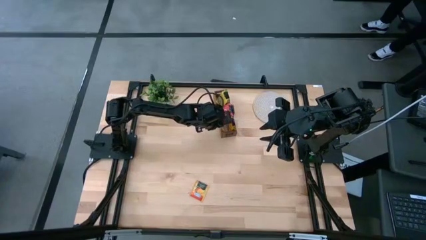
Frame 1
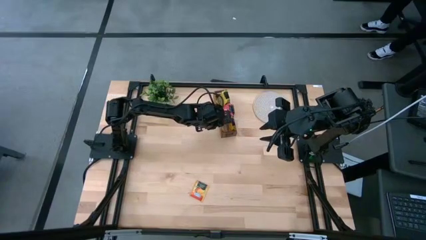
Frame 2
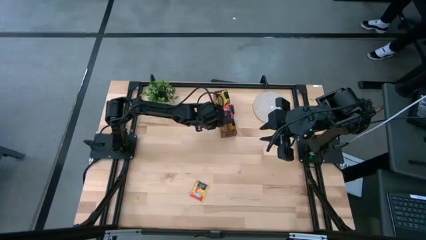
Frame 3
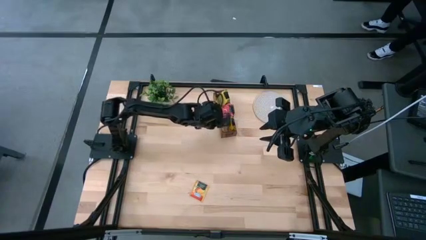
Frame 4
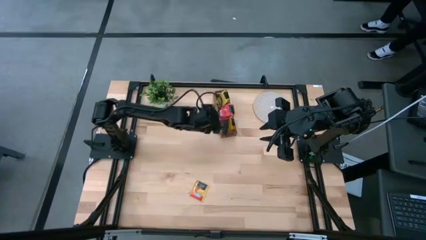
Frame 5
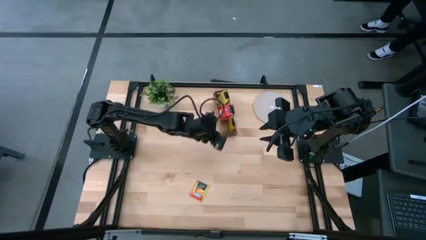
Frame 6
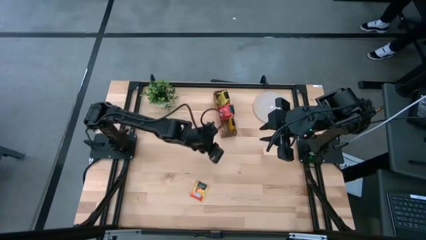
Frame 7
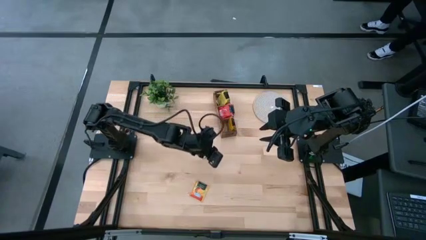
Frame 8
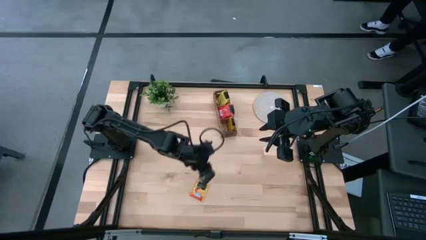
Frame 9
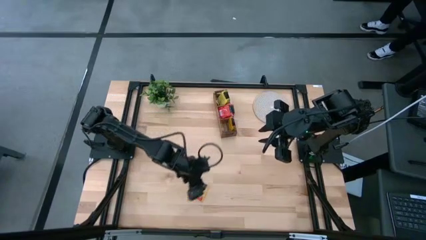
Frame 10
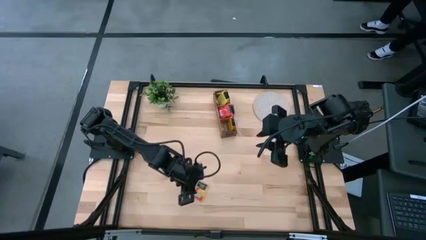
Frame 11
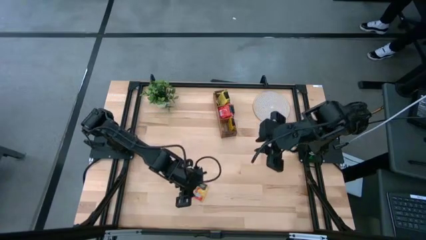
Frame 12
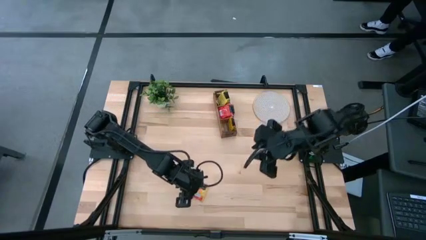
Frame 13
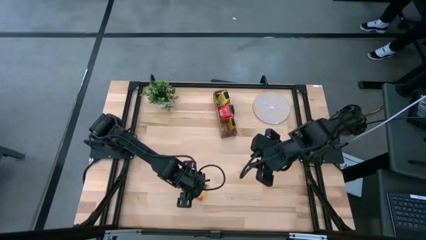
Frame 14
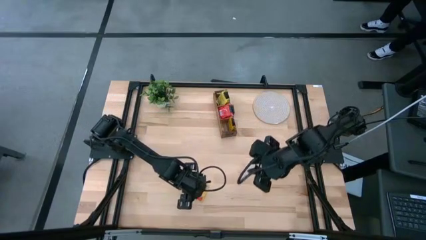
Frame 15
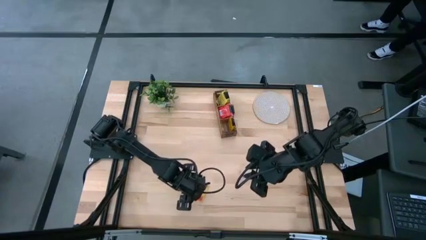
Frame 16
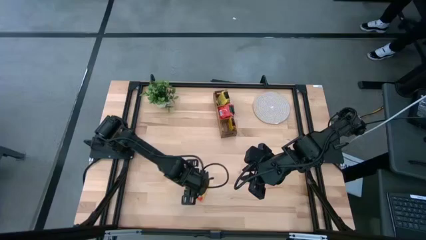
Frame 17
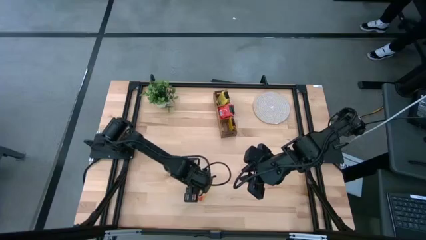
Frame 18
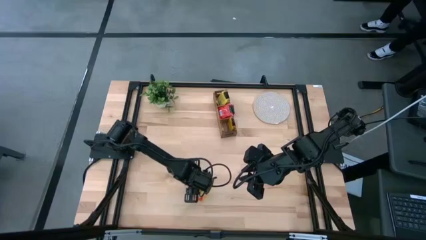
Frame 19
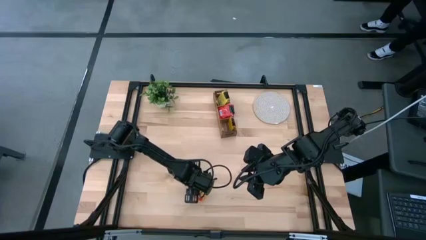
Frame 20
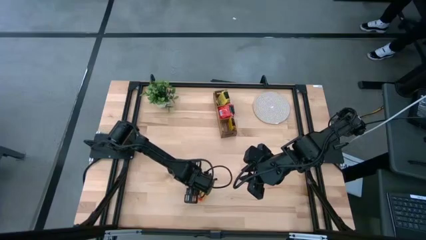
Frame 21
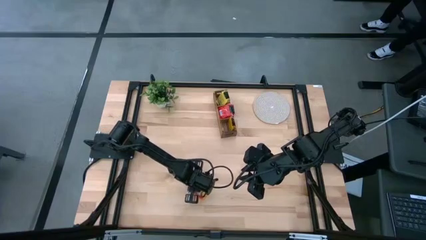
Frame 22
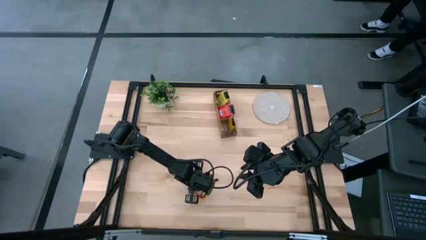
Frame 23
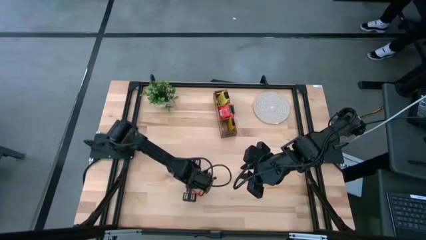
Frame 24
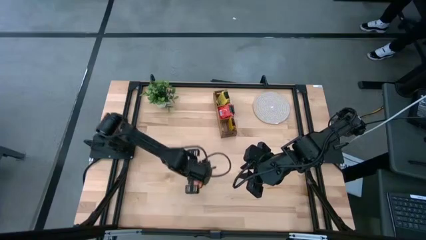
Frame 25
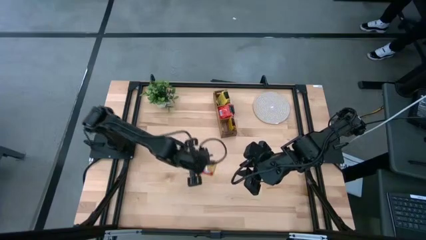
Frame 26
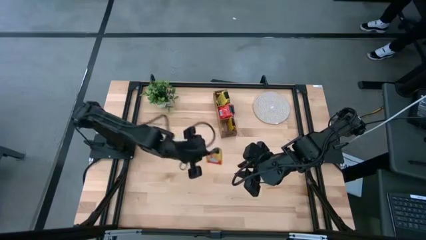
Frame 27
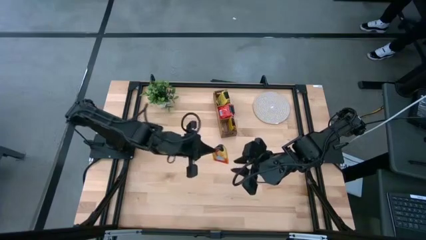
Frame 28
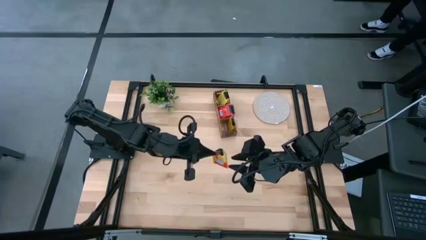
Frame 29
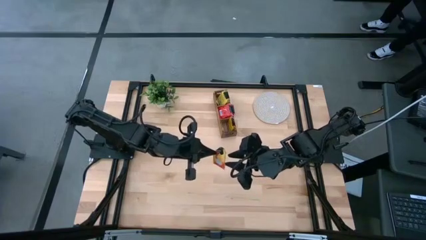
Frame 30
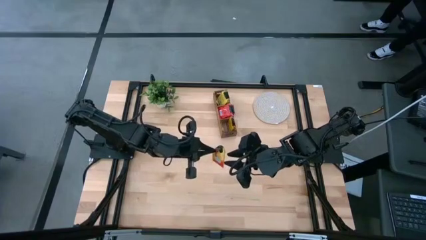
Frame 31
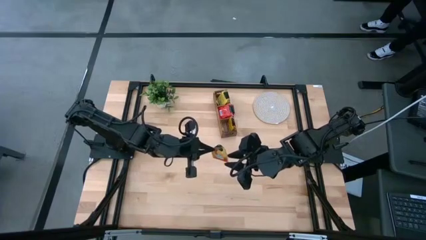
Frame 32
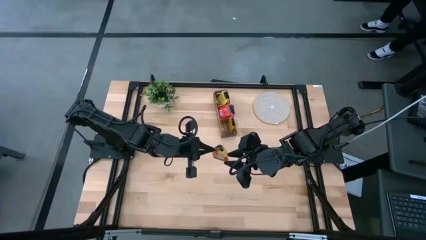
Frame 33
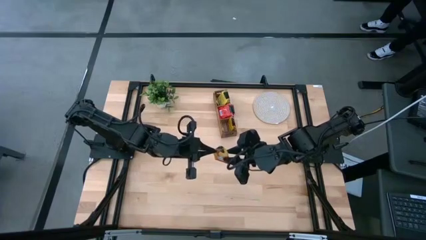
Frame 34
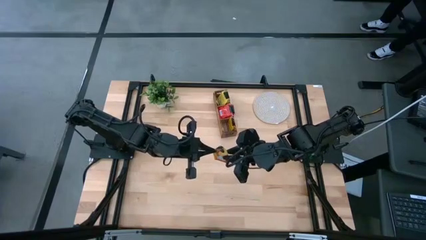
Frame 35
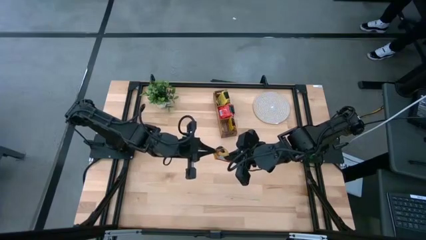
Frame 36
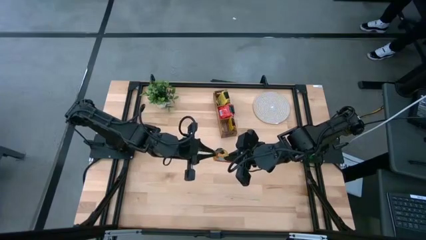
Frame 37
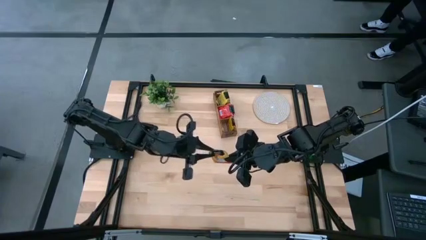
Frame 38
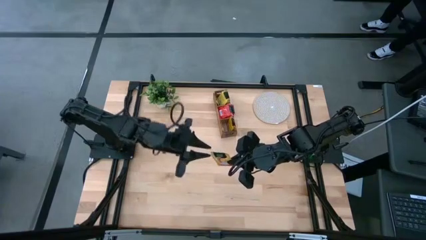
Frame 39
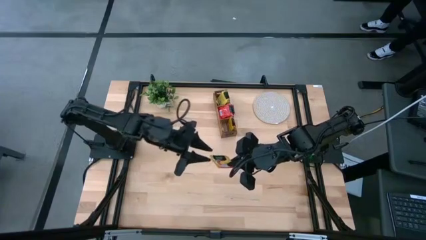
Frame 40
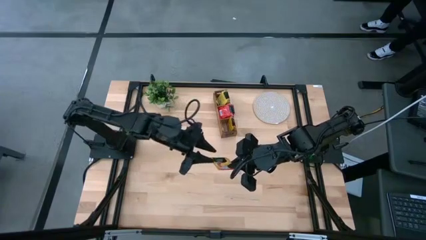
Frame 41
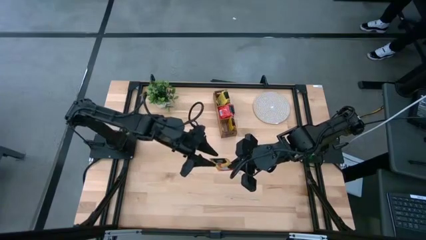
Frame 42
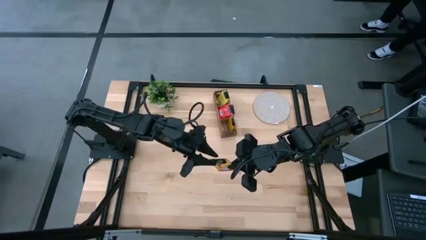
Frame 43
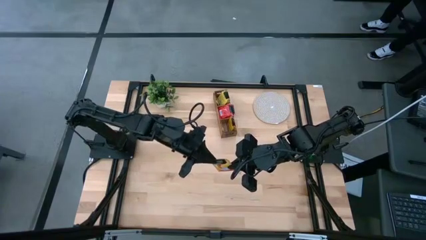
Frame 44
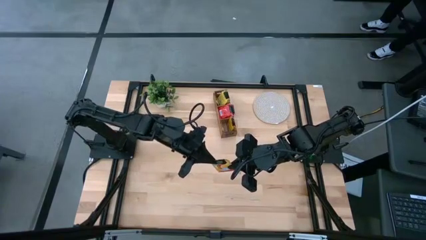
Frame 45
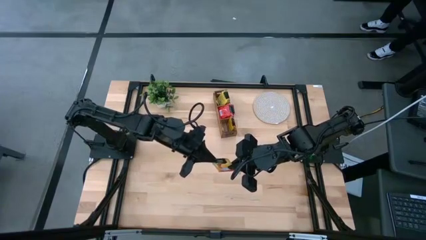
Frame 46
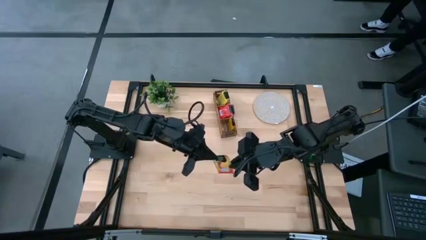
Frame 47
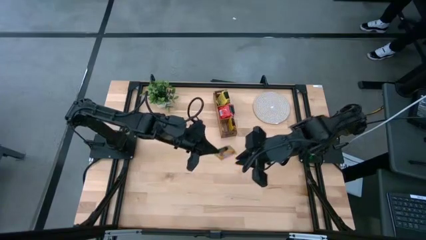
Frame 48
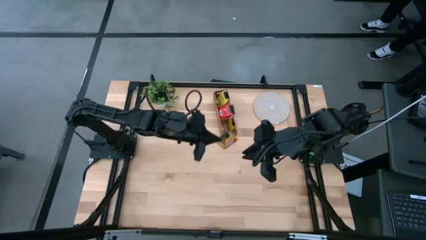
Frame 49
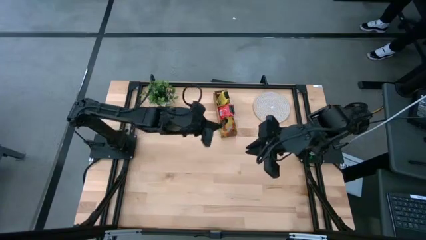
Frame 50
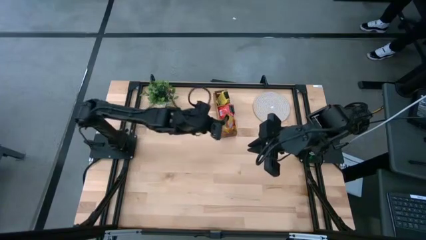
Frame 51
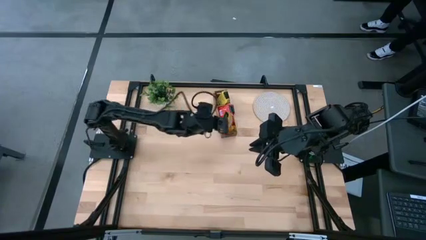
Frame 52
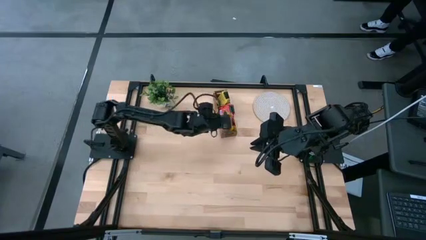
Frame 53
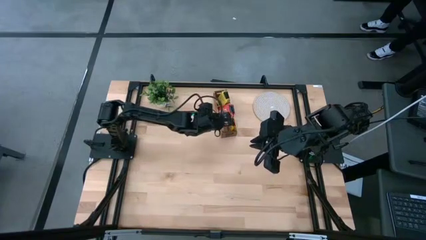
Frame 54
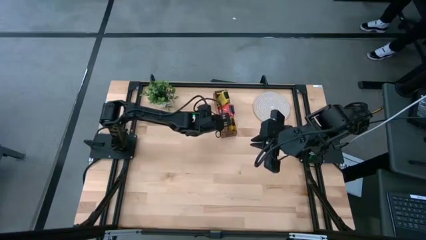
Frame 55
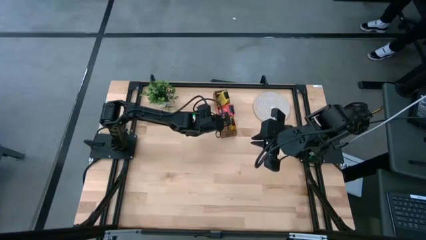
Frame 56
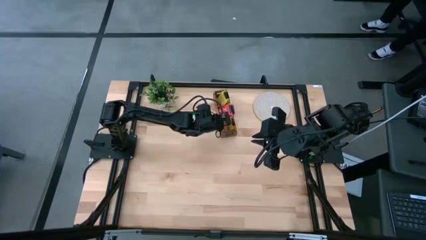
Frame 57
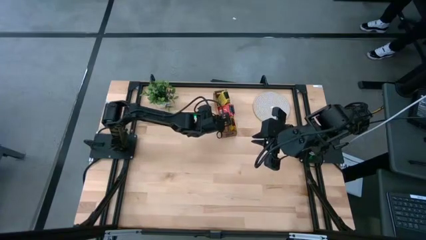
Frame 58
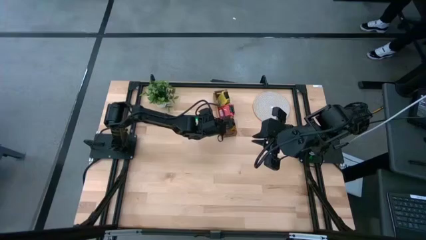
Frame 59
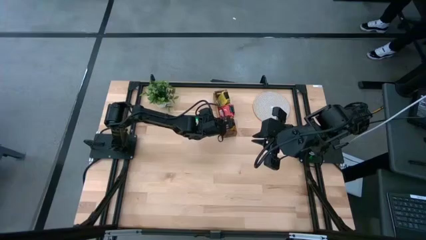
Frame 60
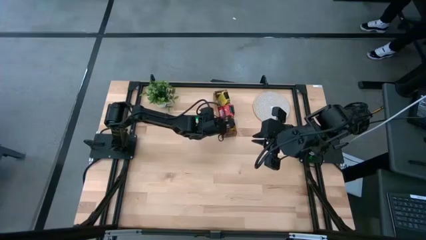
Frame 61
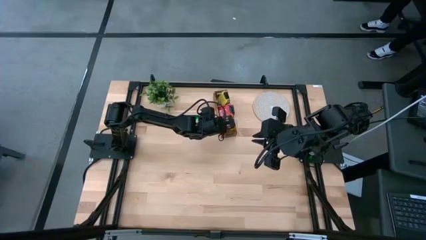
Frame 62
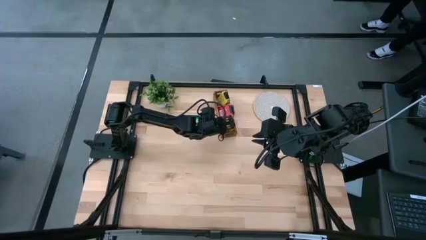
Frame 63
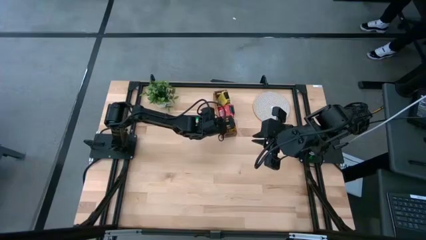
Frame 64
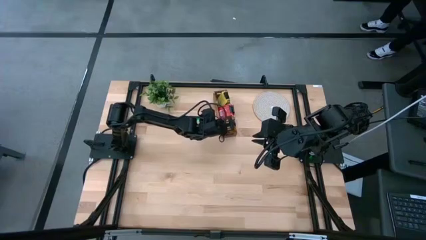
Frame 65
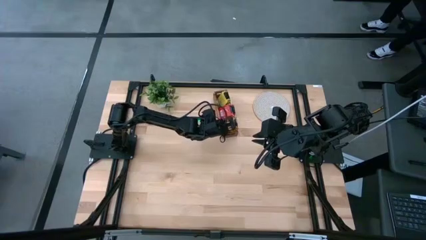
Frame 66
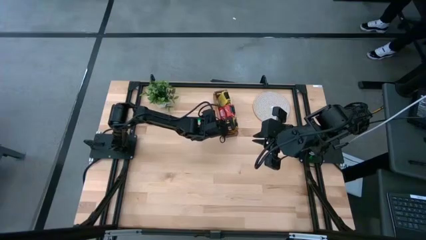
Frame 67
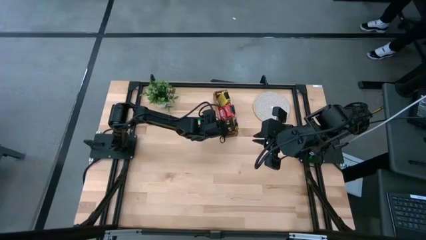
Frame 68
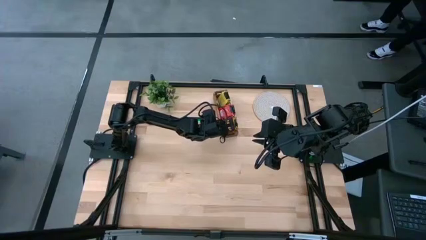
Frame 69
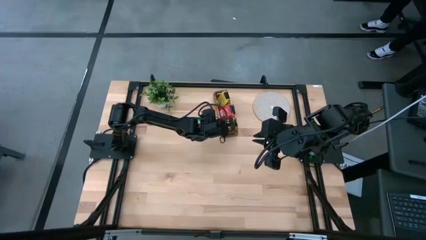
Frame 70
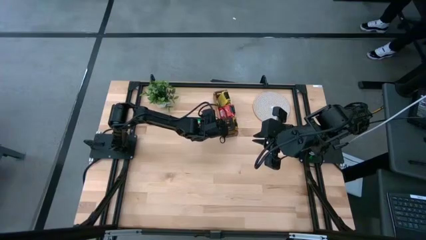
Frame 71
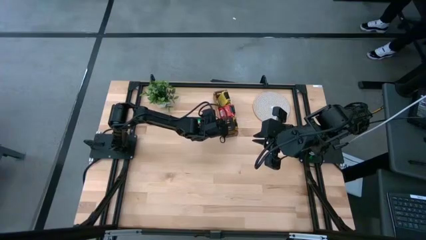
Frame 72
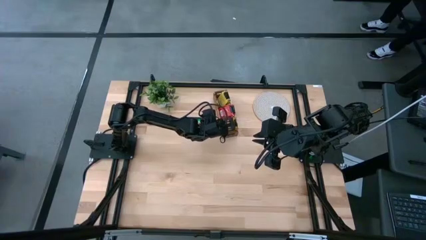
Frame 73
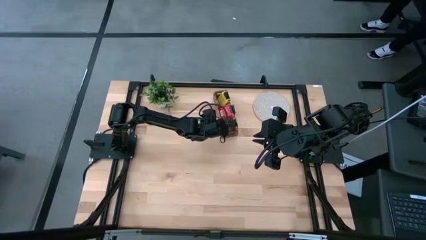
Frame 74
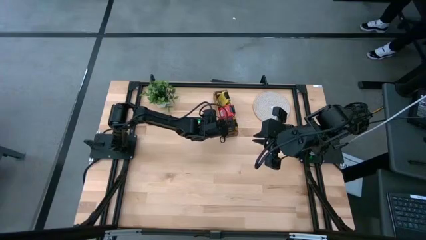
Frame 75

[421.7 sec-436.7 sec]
Task: Pick & Place Tea
Put the orange tea bag into the left section of the wooden organizer

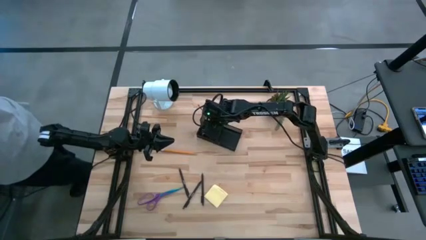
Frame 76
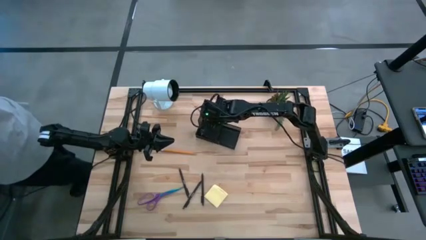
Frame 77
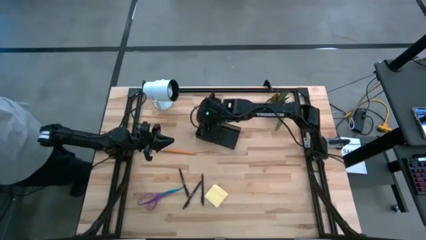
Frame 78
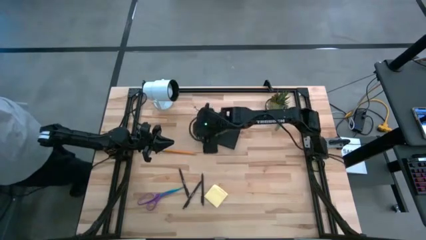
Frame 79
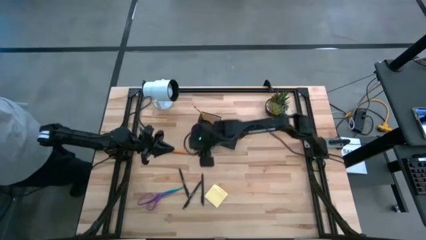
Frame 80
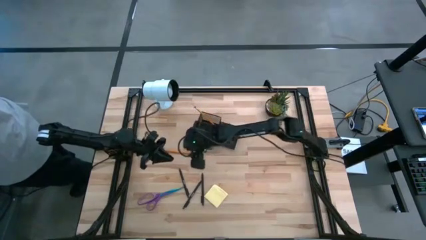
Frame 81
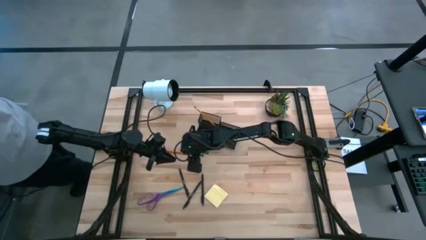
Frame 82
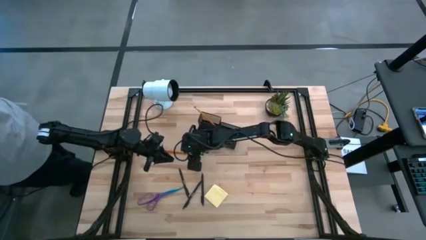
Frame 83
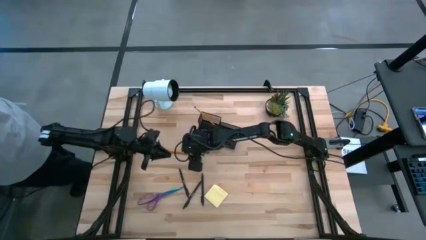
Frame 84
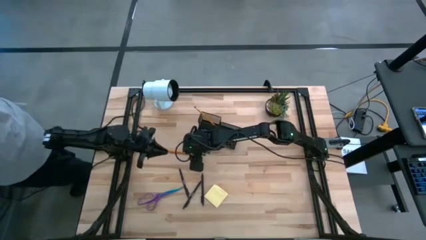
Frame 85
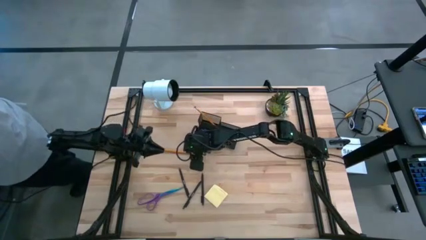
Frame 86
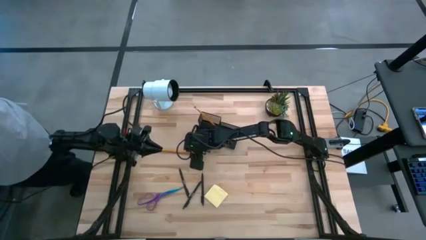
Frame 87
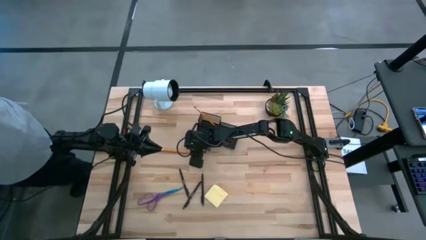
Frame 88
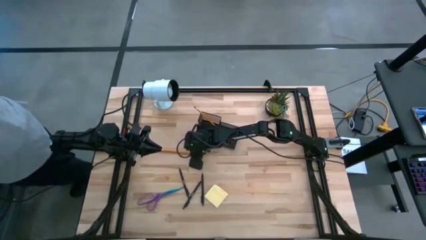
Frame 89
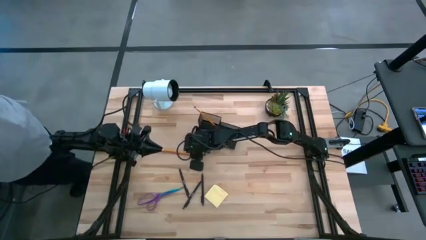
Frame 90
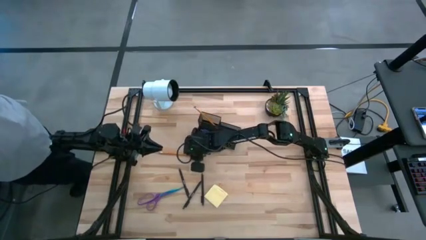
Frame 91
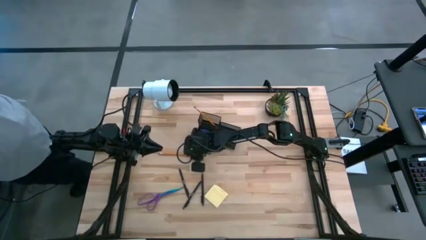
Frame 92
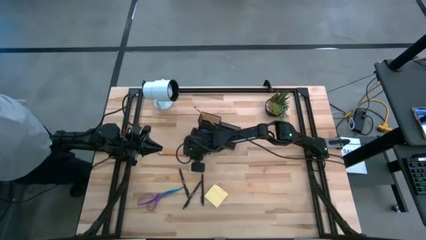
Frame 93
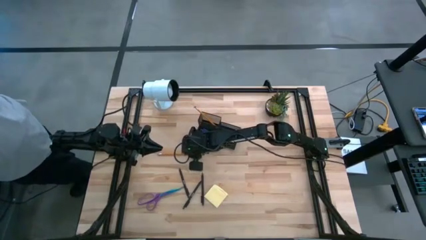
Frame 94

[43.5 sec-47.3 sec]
Task: Pick and place office supplies into organizer
Put the orange pencil into the black desk organizer
